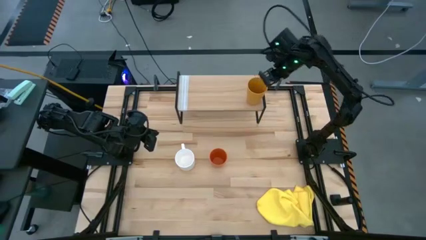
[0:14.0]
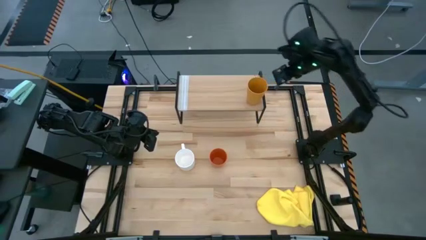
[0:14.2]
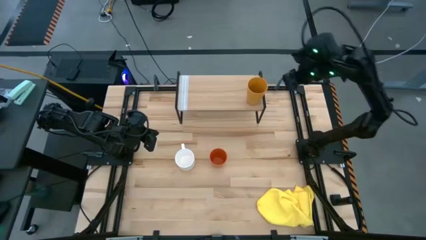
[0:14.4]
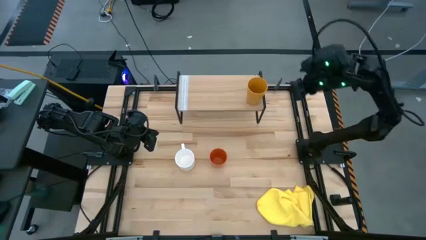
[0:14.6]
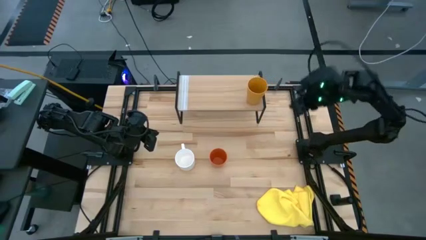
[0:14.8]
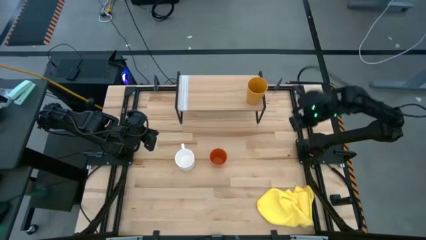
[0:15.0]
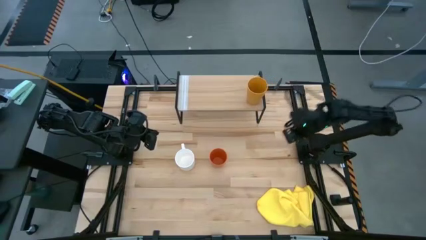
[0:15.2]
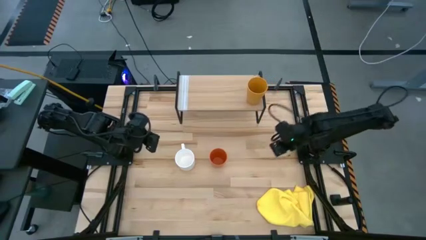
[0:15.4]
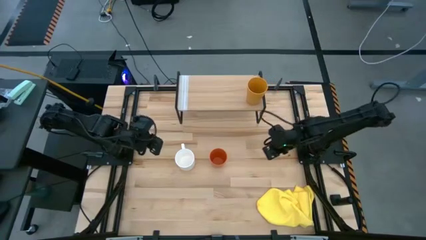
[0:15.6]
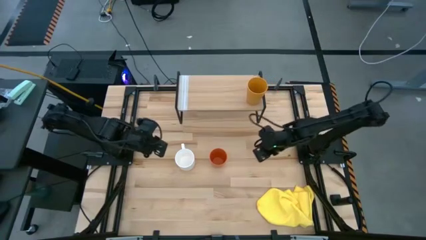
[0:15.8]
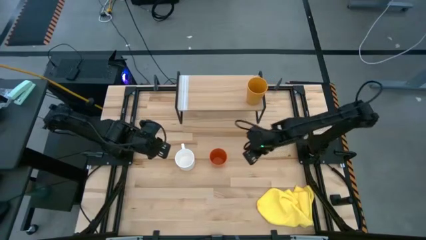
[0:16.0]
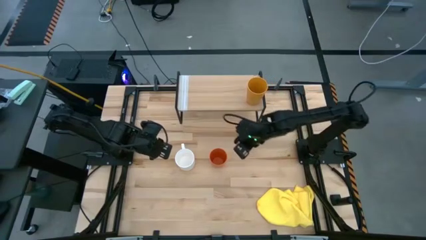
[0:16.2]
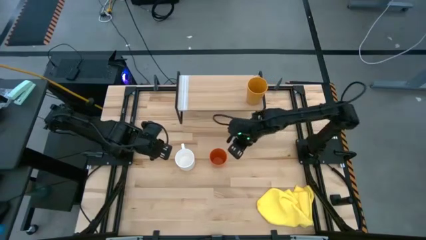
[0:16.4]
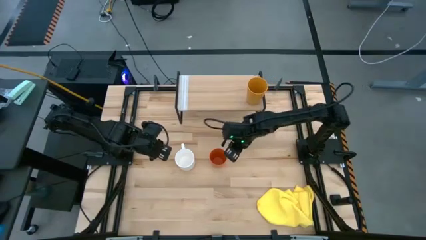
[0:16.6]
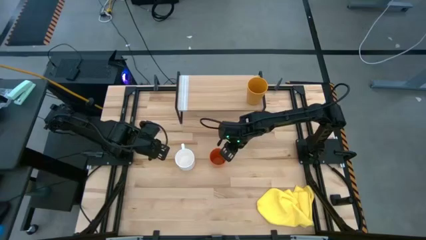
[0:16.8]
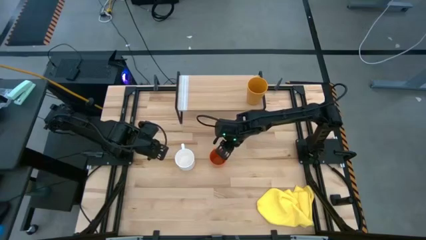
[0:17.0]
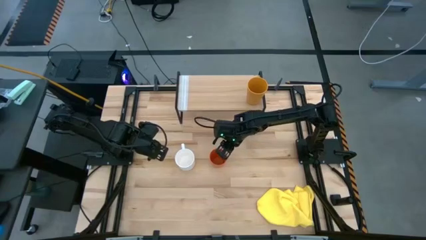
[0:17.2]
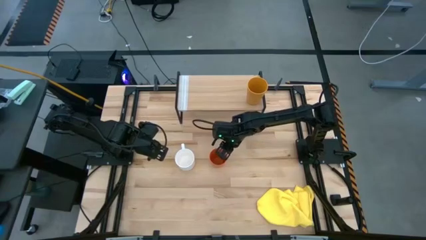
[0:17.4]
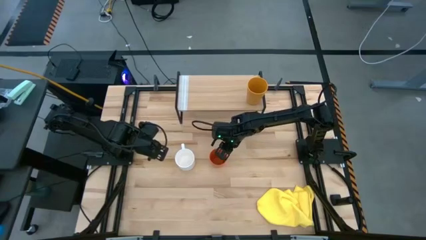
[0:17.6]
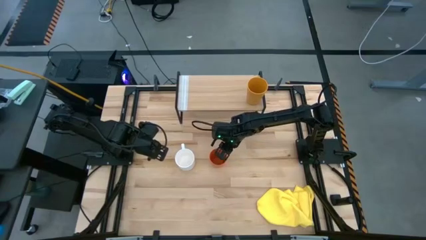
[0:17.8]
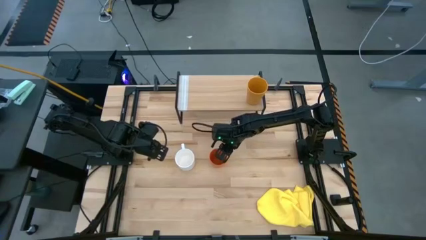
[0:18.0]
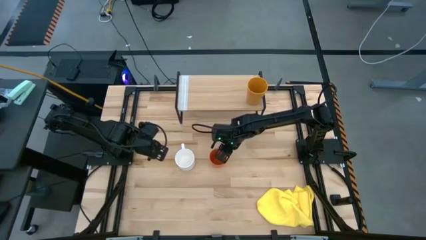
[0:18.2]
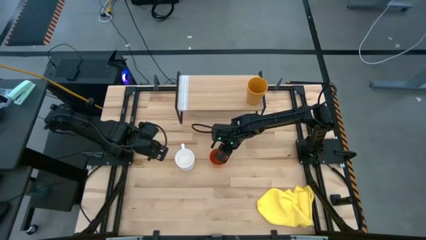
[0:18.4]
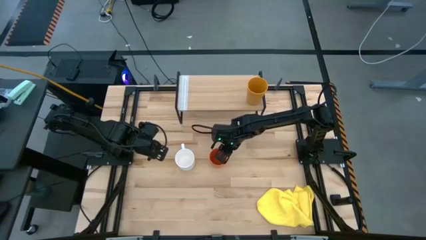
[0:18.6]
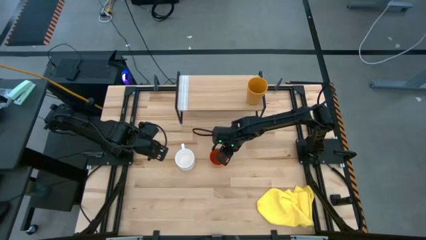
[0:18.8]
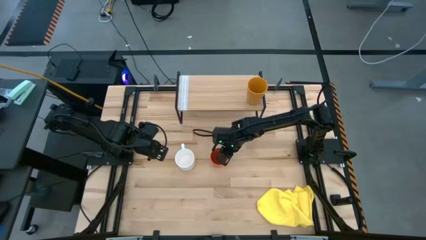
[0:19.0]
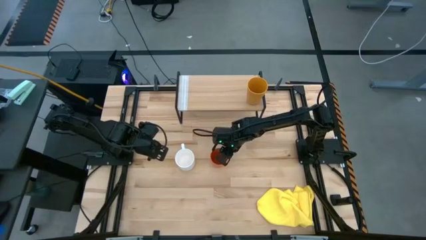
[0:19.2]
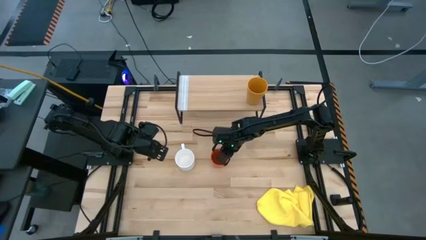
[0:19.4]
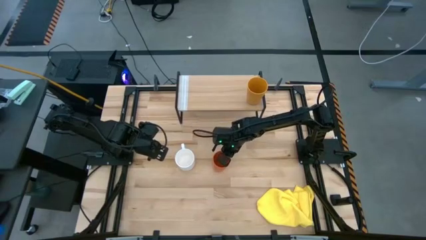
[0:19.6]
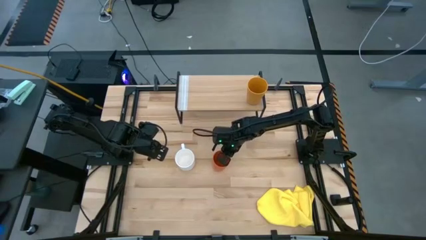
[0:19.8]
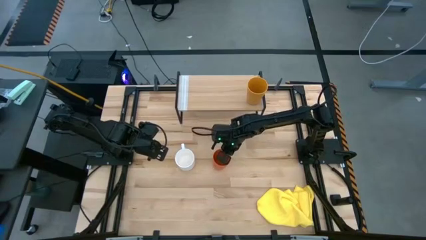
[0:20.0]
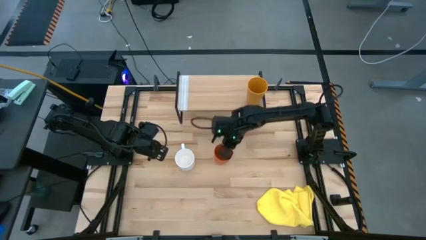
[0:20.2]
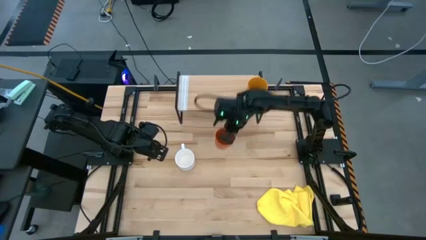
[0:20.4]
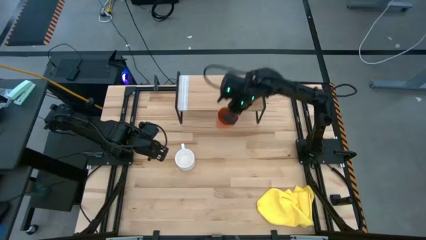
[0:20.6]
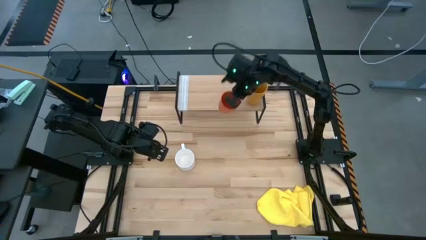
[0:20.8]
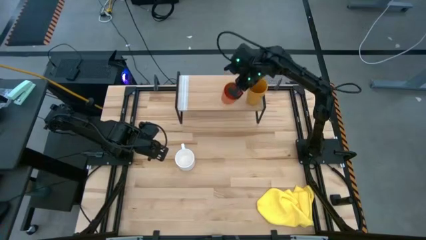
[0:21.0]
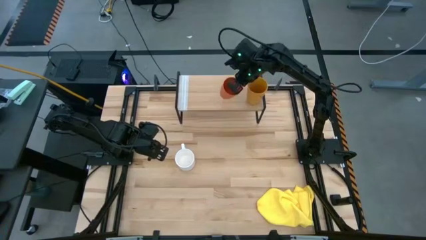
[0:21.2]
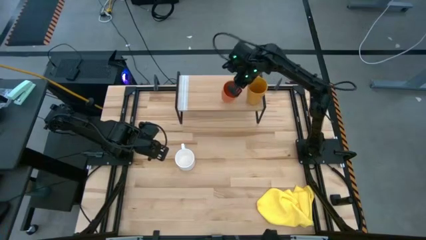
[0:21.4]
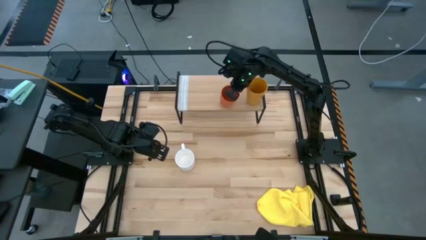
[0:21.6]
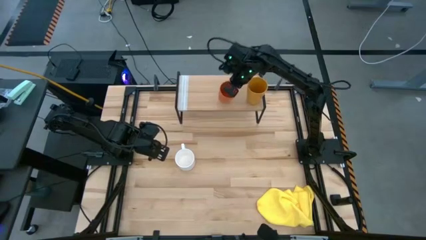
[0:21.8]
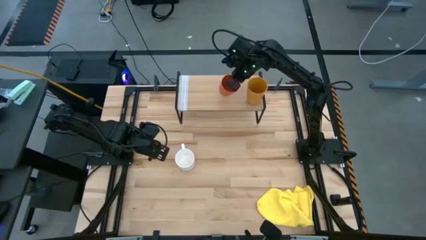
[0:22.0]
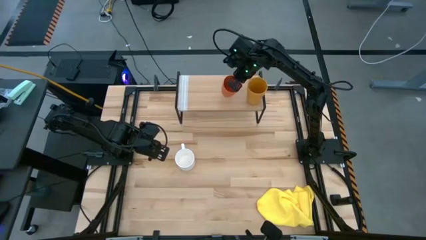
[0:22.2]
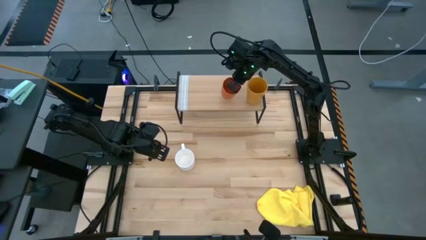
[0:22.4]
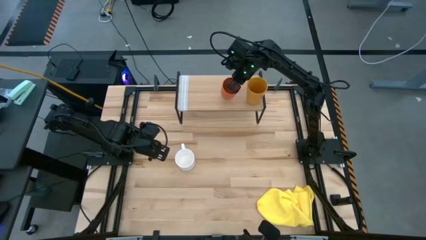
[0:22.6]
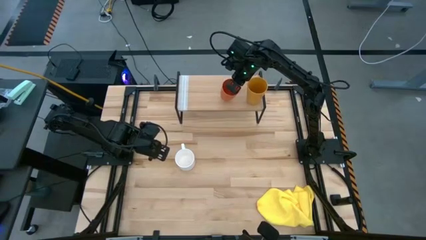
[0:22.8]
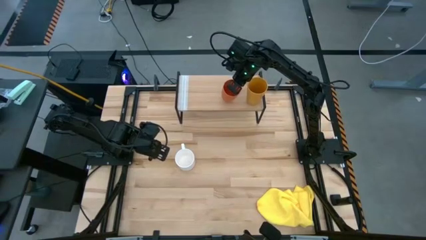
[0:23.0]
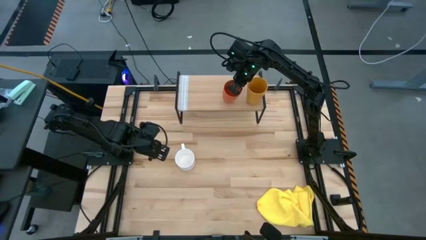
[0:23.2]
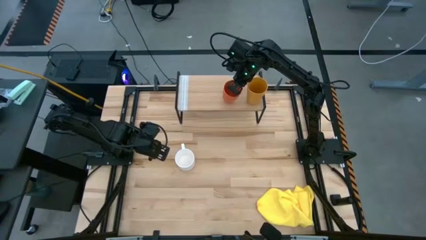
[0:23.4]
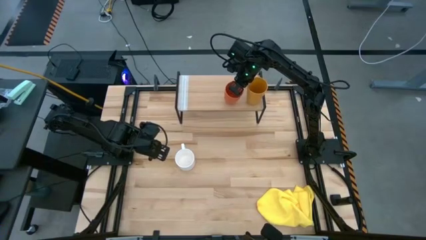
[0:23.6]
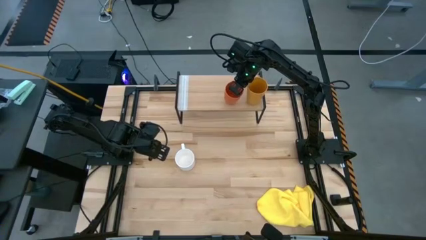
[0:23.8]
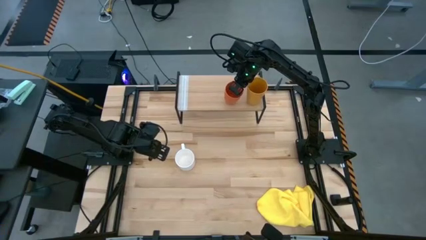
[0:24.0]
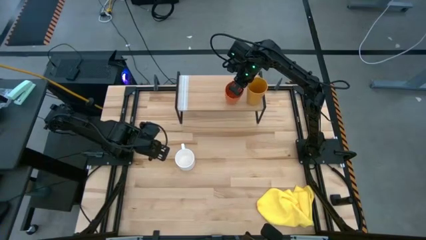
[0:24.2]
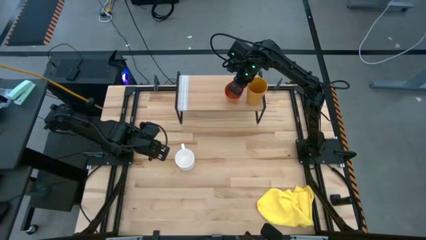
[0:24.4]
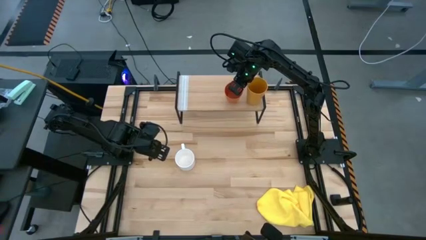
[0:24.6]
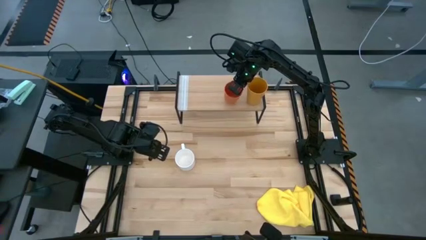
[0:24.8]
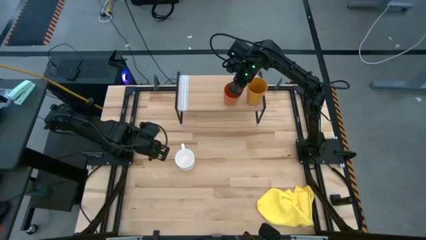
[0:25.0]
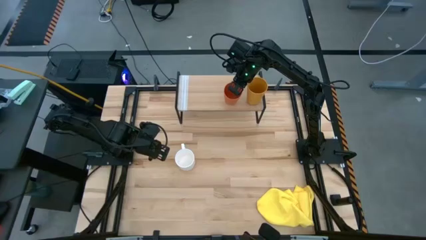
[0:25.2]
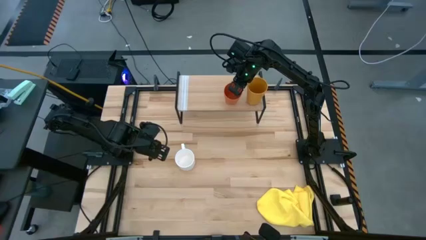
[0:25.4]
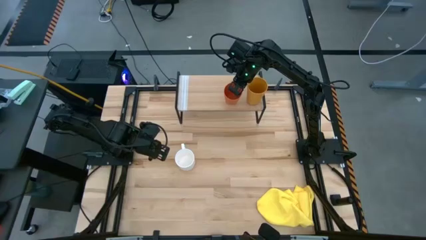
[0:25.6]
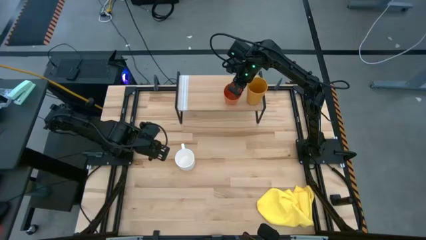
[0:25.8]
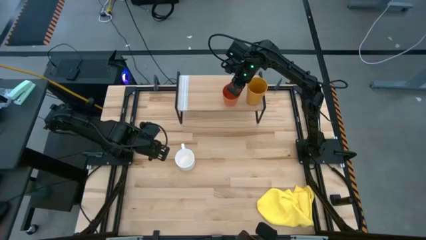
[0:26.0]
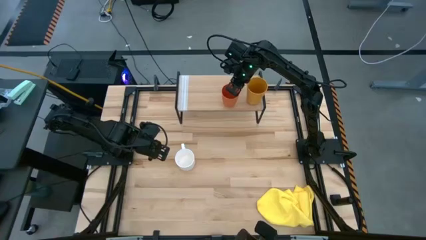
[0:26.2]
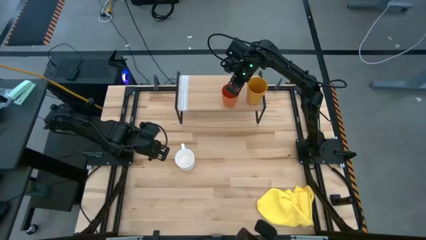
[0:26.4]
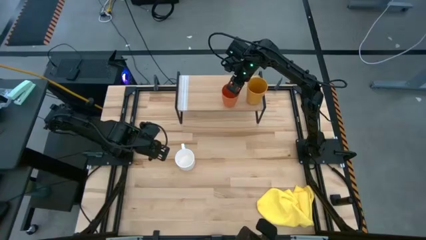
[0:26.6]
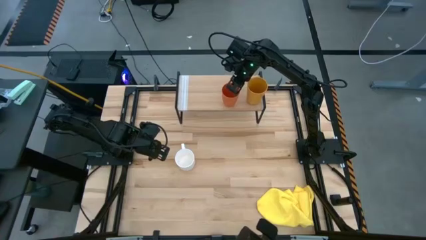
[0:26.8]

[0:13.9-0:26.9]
Task: Stack small to large cups/mugs on shelf
Put the orange cup on the shelf
